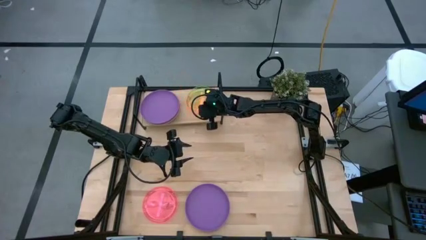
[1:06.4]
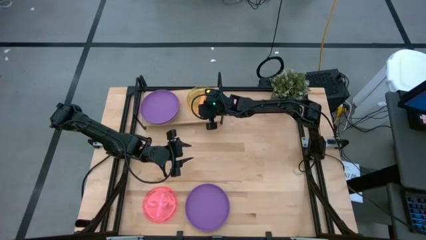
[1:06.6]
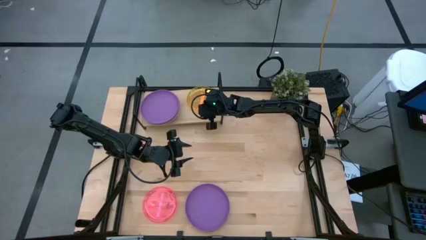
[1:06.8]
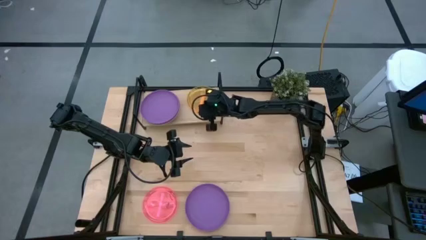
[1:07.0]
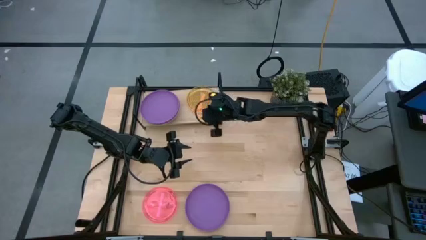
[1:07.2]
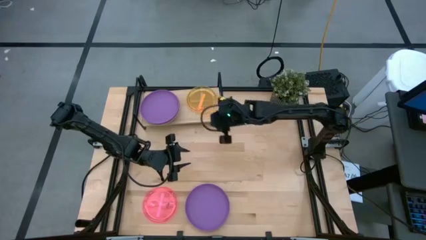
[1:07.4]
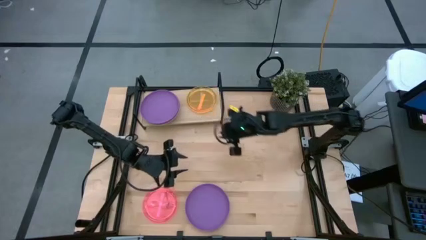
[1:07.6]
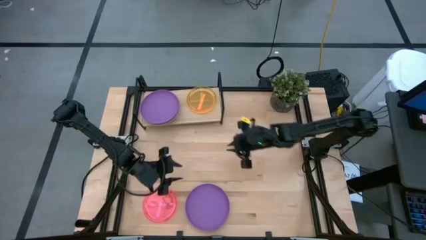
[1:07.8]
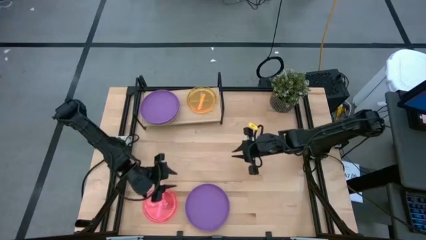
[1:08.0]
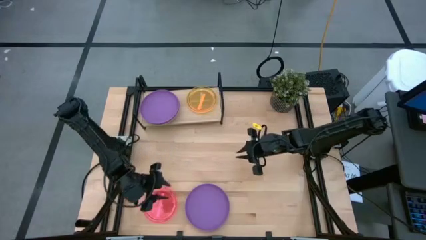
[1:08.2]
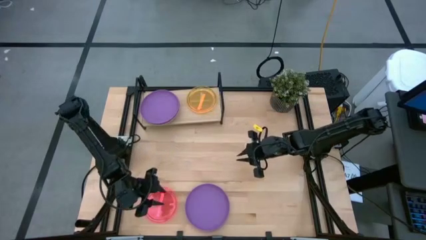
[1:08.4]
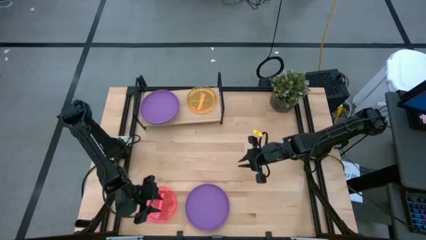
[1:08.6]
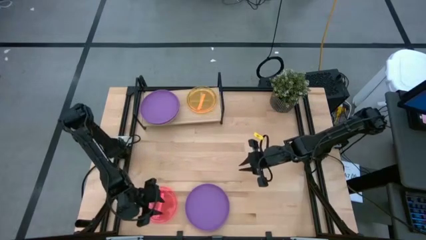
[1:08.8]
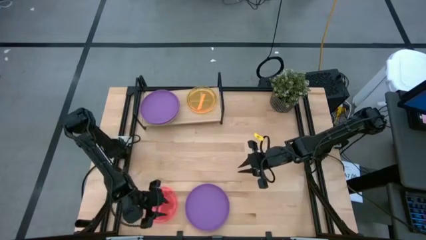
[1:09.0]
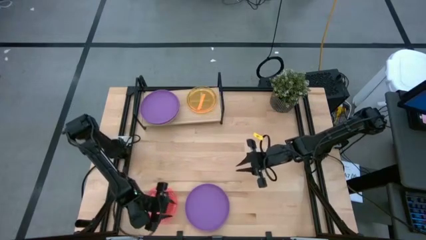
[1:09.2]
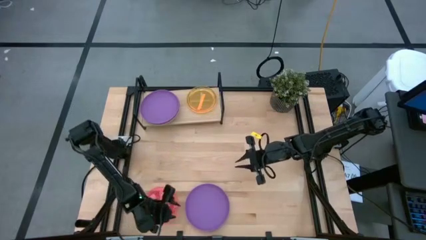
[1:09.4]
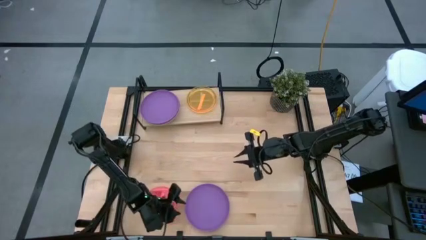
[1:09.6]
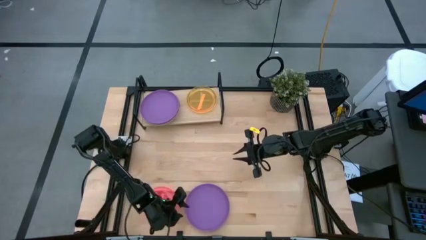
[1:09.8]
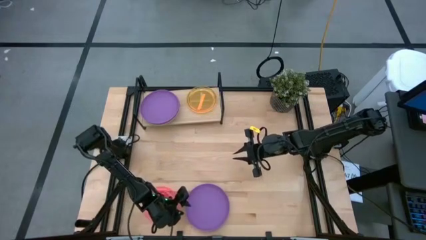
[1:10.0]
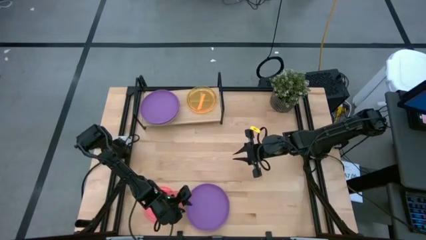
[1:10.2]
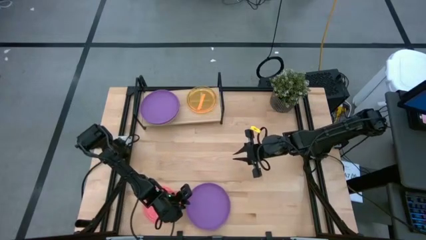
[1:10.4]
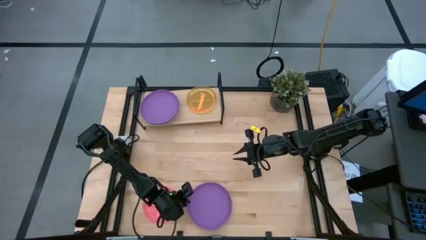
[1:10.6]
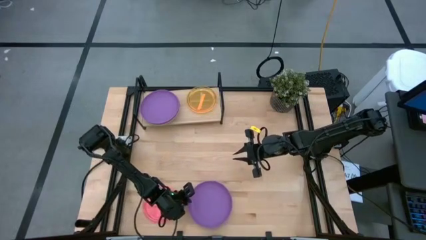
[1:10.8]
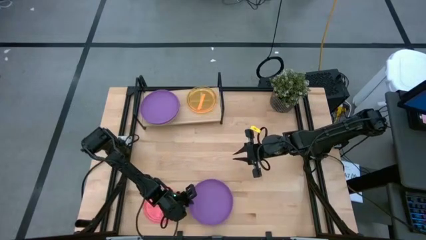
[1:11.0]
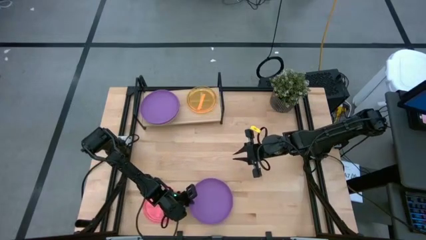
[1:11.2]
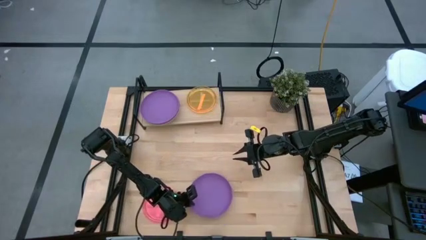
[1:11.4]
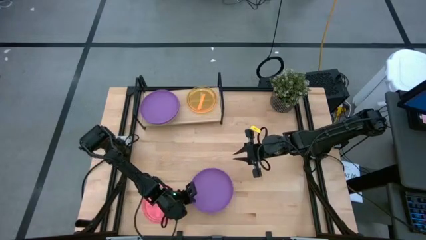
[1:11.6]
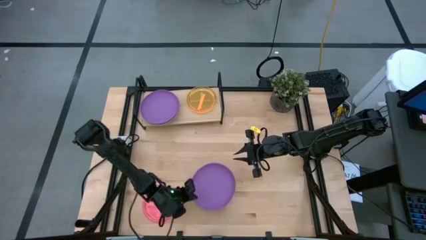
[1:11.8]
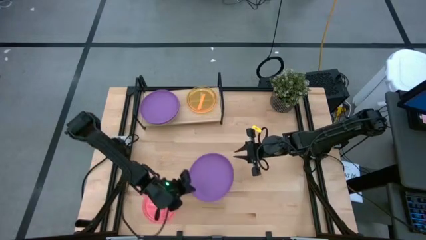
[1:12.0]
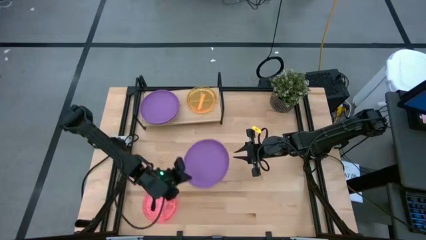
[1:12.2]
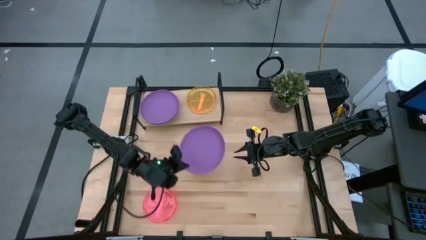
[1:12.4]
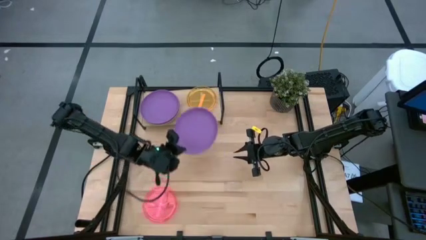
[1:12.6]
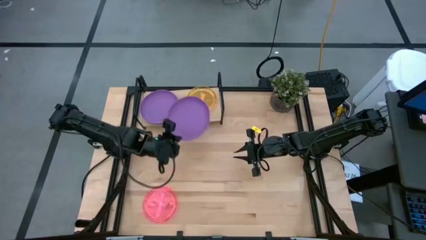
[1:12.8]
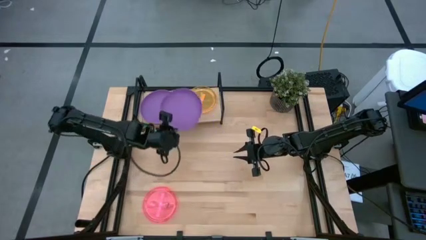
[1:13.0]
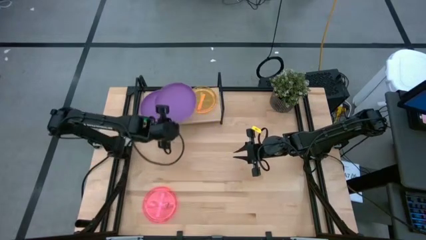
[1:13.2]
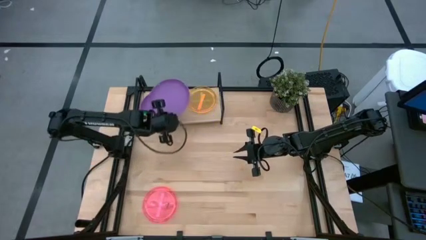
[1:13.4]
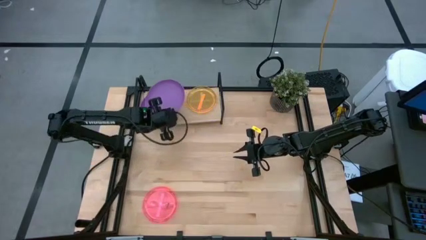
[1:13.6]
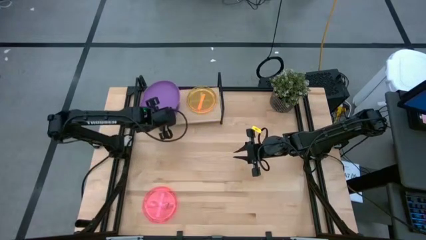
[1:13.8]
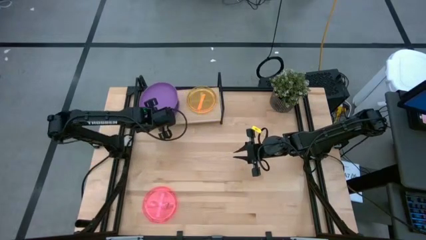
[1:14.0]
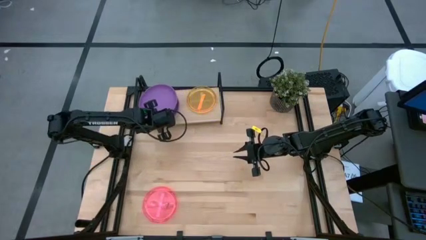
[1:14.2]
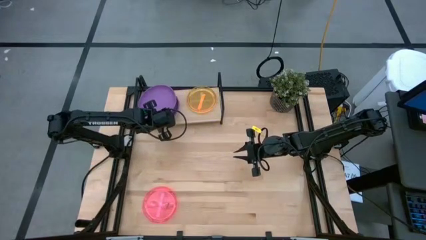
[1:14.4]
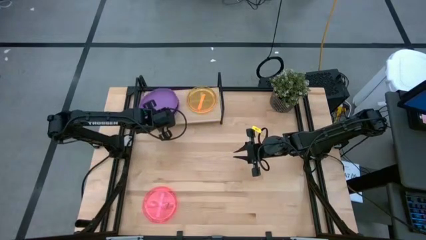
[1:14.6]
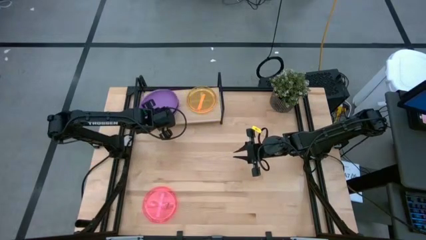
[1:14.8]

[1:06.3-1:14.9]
Task: Place and stack plates onto a shelf
Stack the violet plate into the violet plate on the shelf

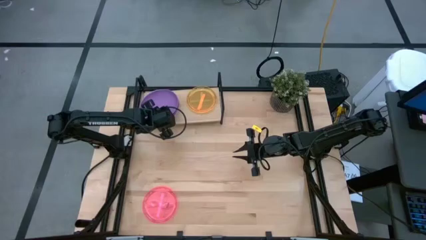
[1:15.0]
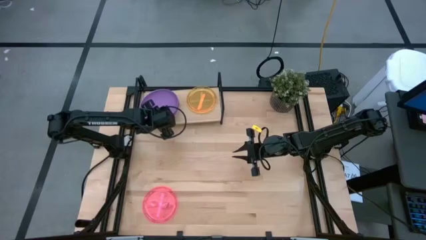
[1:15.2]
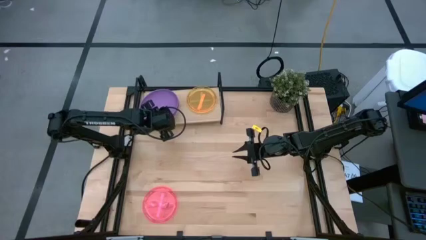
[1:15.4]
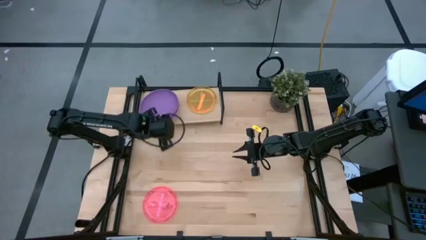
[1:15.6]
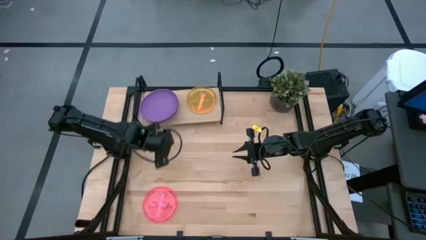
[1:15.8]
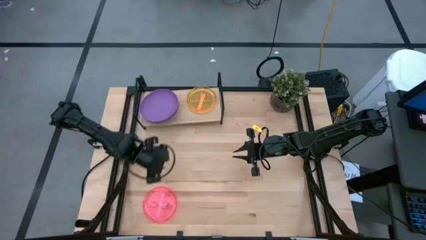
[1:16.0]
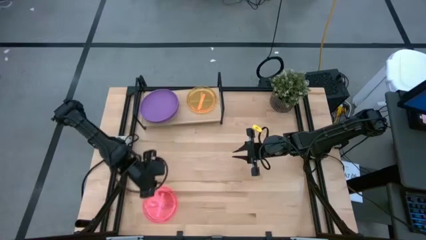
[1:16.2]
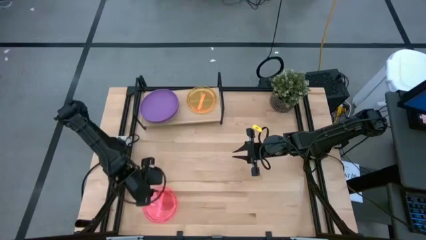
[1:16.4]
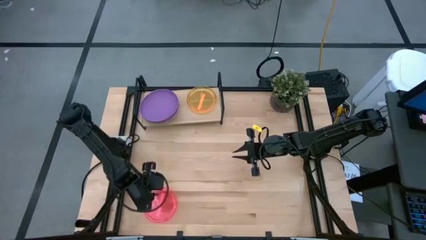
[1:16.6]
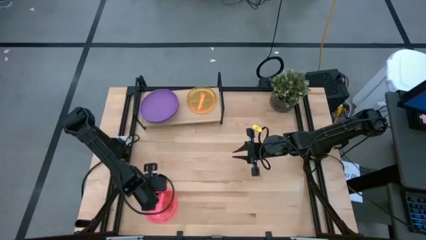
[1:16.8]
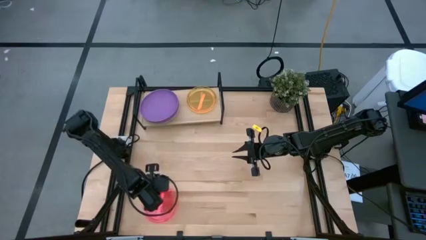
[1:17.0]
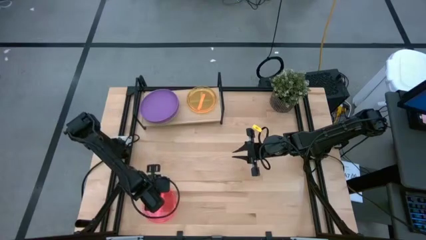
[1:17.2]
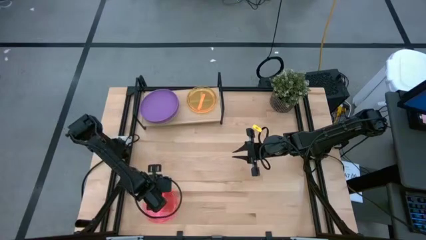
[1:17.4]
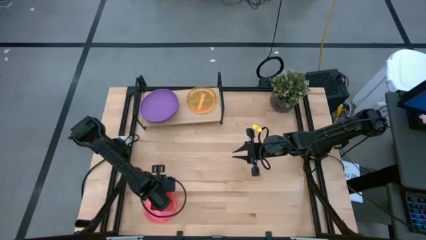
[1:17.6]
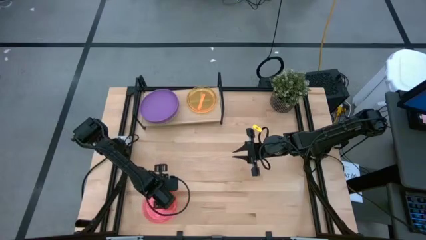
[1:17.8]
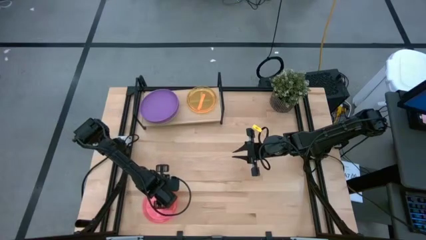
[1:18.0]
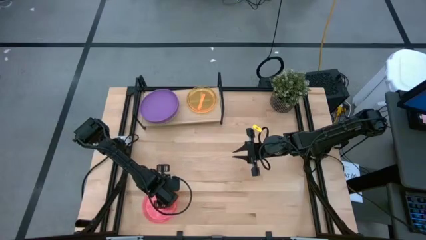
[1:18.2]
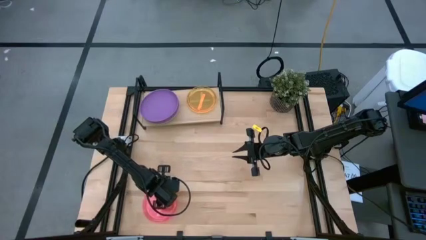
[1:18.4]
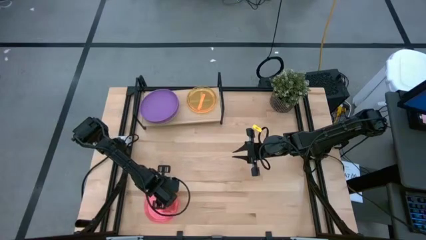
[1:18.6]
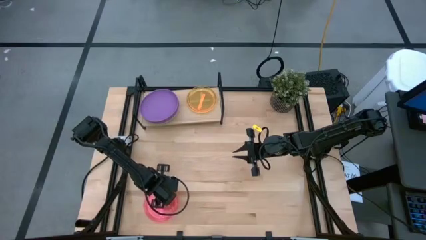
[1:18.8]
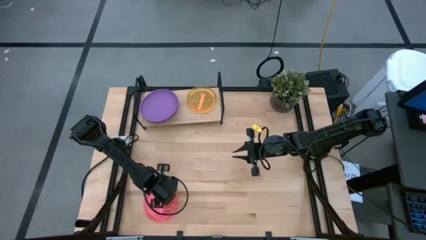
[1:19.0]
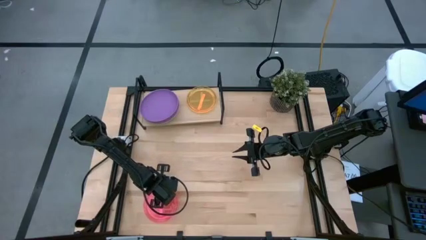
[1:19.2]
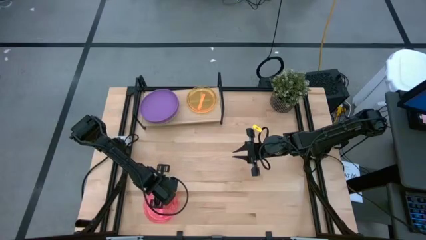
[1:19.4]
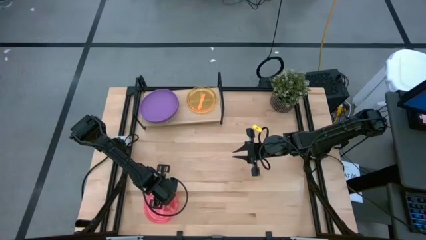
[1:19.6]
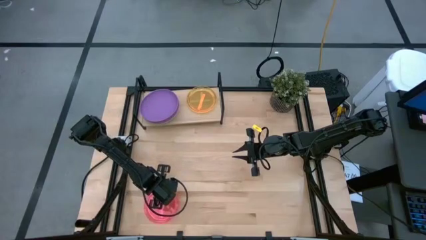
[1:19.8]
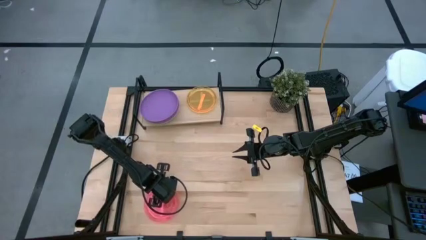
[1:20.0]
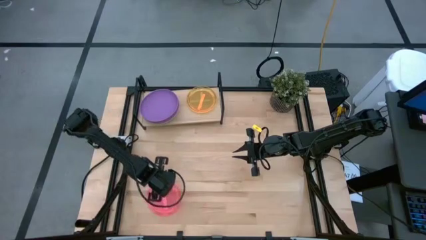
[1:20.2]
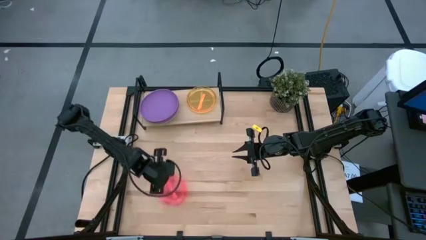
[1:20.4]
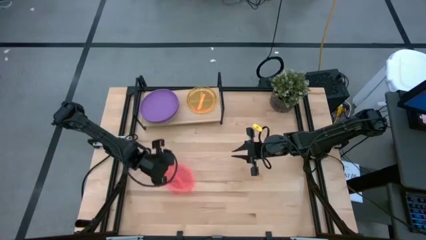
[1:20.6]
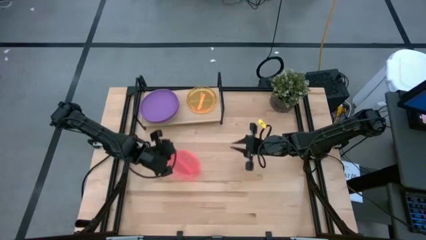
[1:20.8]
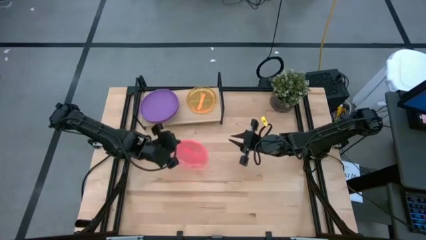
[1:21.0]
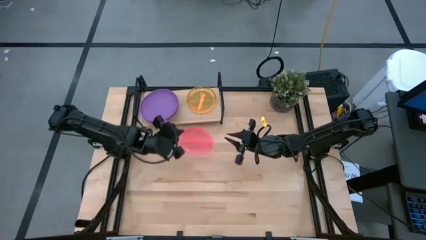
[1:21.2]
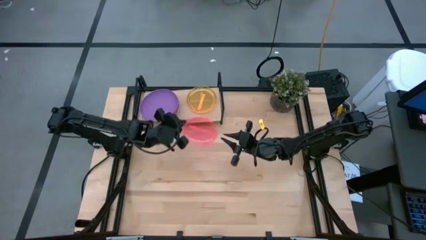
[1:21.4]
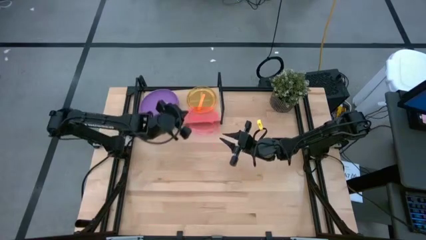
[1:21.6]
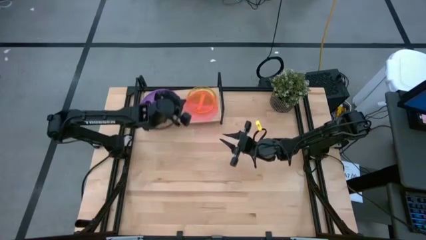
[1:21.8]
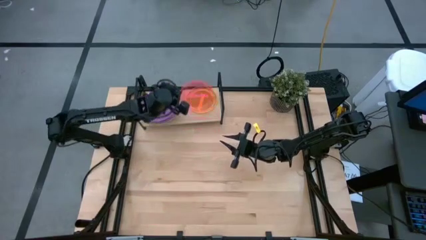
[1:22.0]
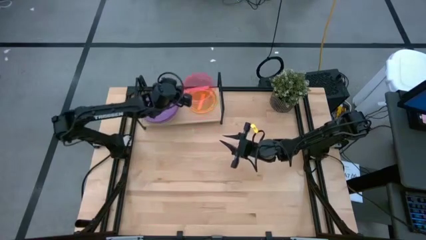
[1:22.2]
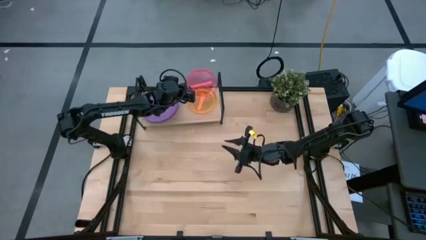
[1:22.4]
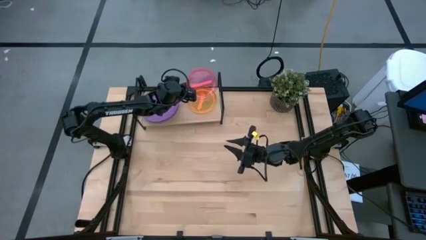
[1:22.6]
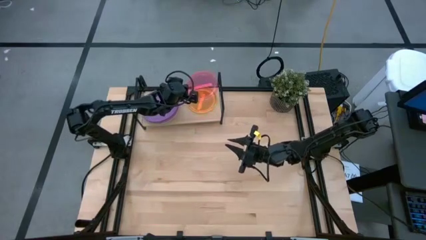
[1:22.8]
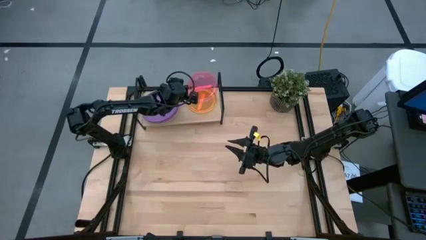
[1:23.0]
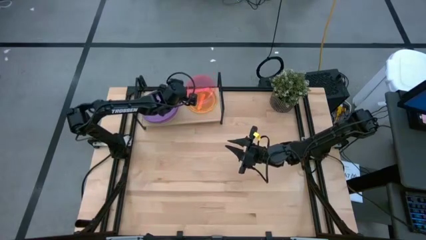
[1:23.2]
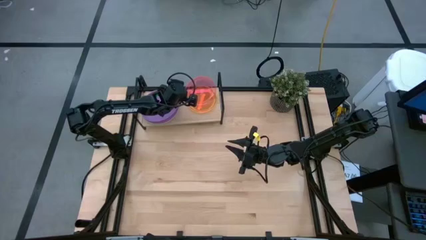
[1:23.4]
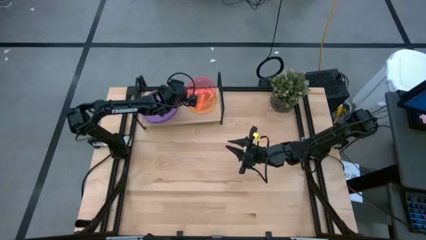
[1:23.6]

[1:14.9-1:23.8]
Stack the pink transparent plate into the orange transparent plate on the shelf
